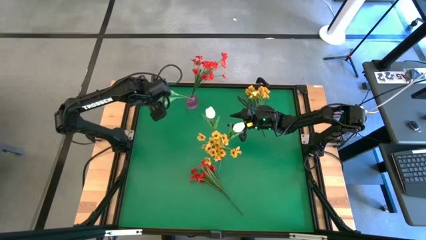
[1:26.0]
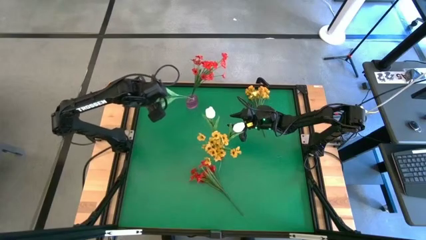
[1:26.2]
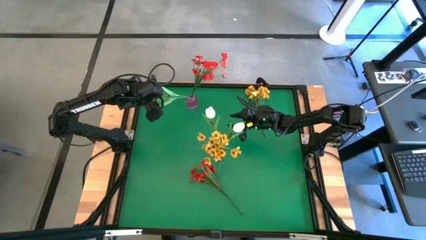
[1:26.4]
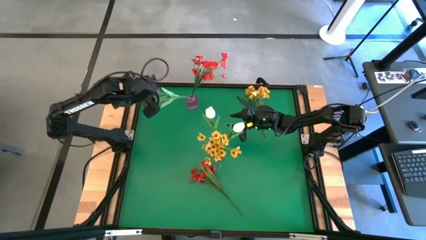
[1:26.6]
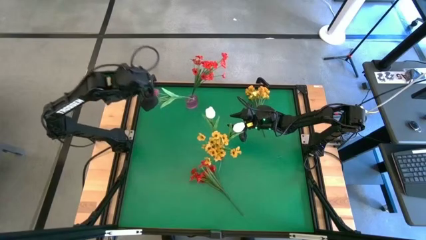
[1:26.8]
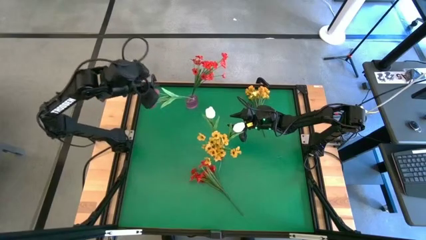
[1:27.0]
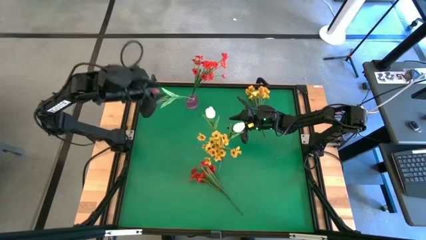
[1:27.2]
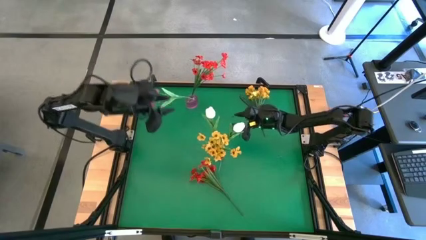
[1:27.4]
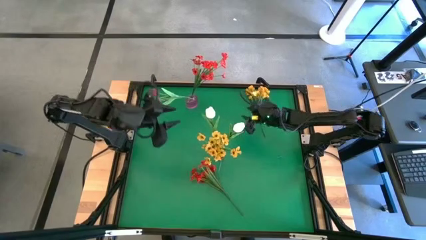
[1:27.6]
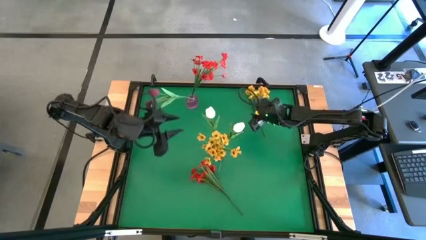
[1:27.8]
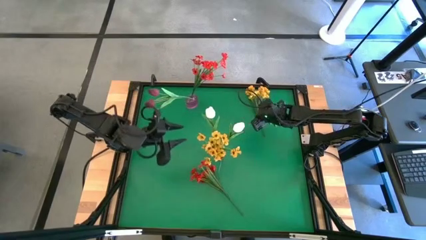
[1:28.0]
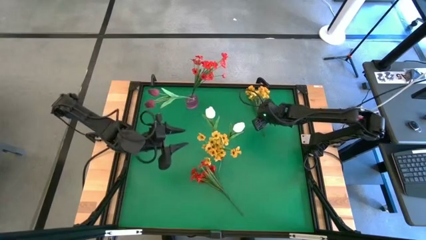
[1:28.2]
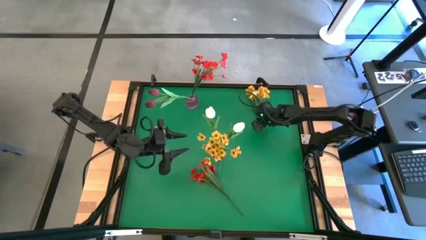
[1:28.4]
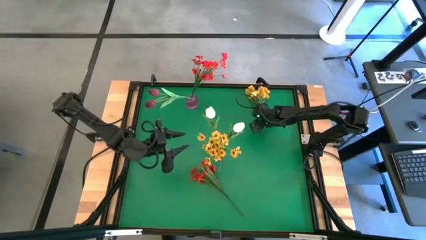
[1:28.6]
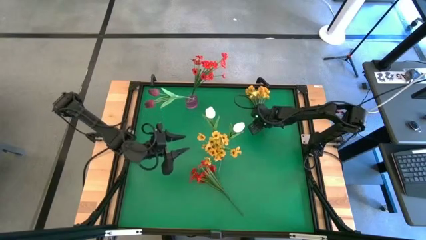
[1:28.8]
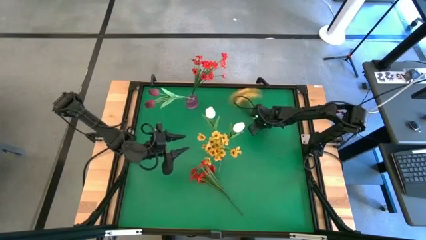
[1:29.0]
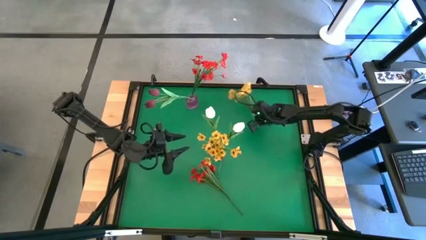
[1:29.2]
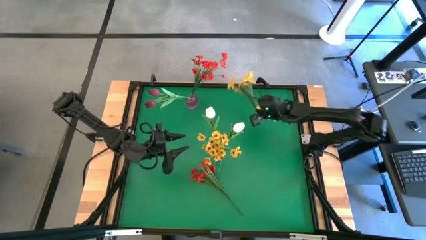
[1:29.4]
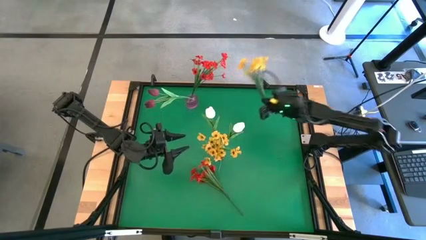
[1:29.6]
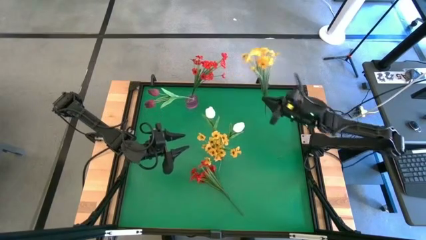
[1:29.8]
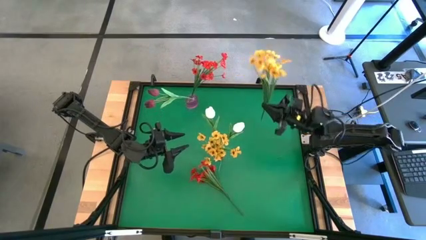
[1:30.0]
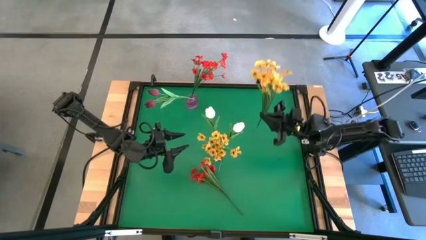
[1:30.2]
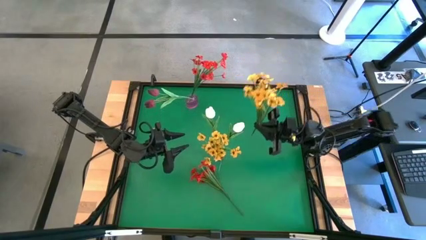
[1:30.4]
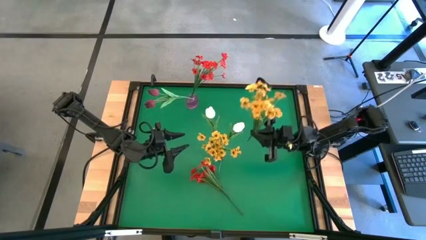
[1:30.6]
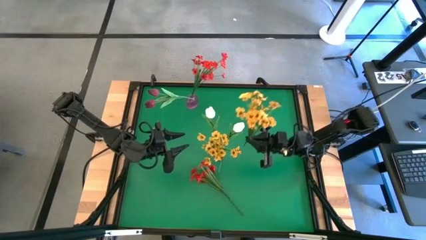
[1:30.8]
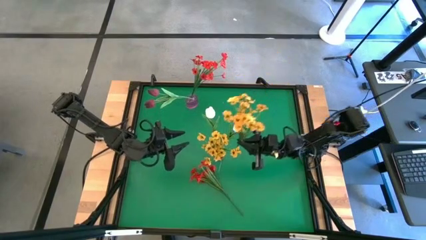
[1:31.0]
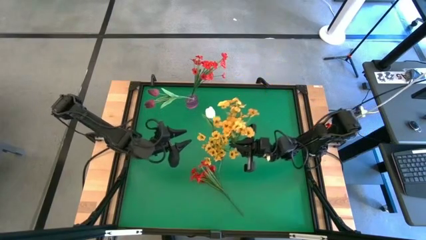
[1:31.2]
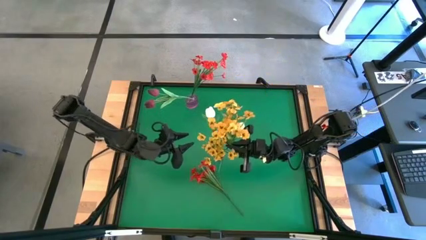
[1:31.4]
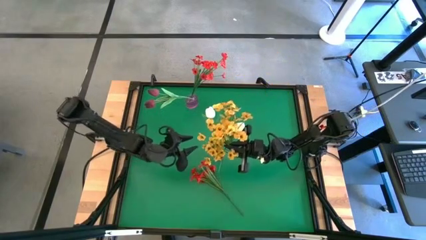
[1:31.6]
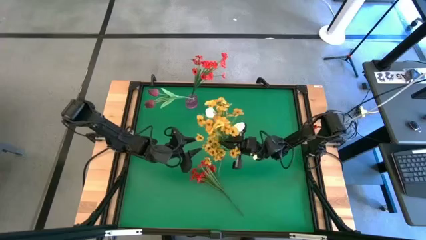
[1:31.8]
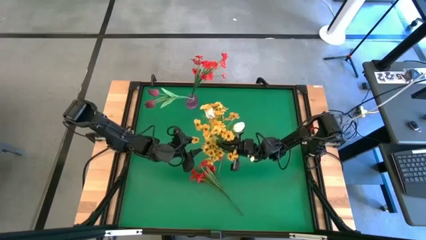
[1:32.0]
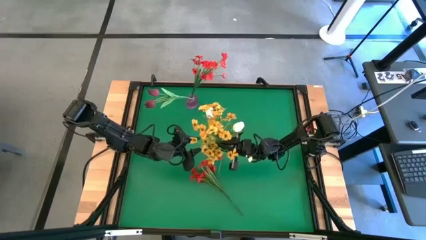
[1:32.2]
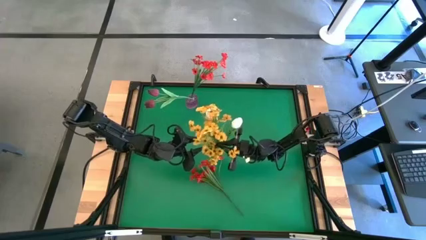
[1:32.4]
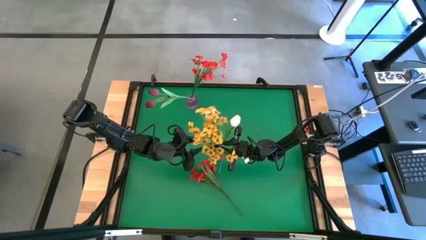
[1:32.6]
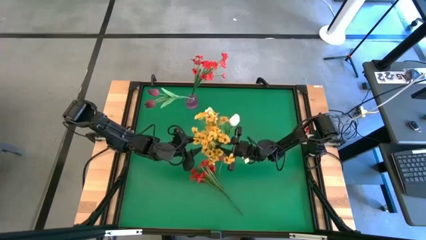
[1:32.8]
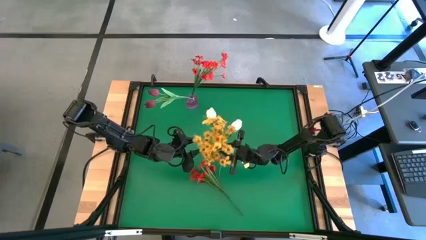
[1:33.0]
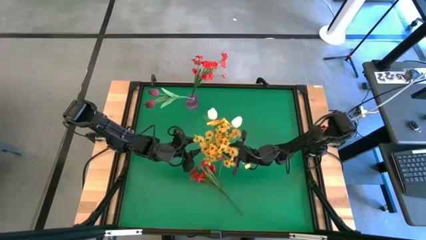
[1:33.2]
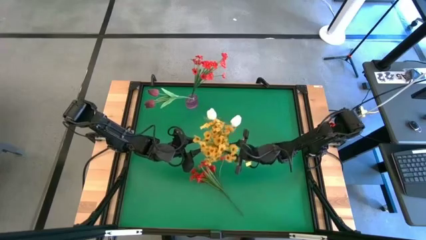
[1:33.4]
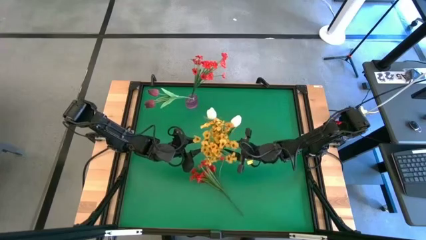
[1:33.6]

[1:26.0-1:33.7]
Task: Sort flowers into vase by color
Put the yellow flowers into the transparent vase

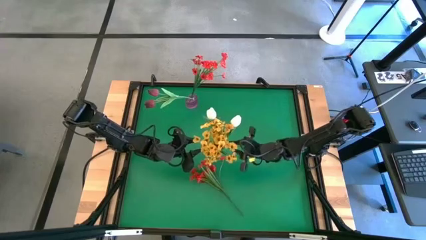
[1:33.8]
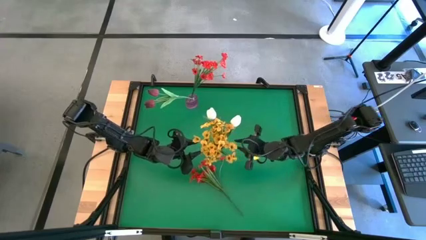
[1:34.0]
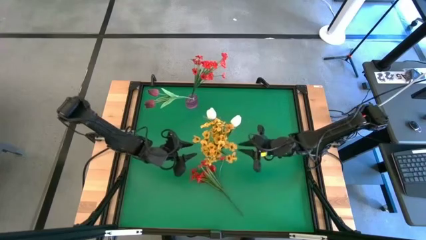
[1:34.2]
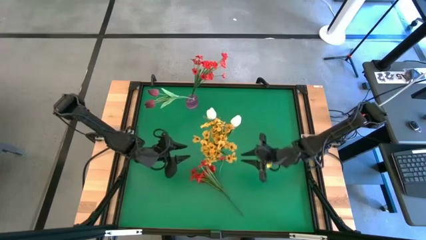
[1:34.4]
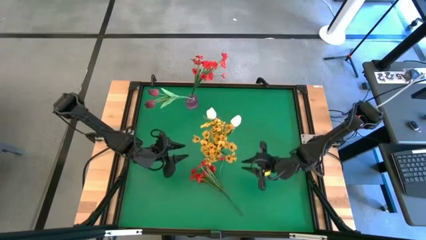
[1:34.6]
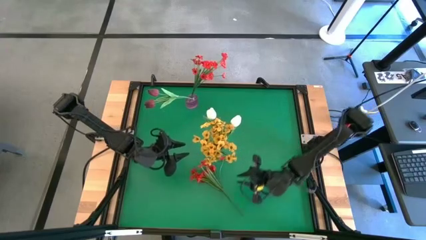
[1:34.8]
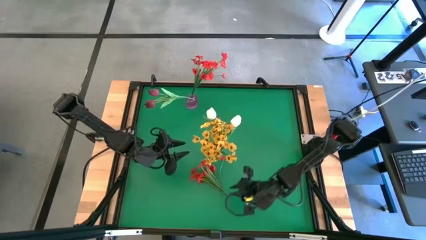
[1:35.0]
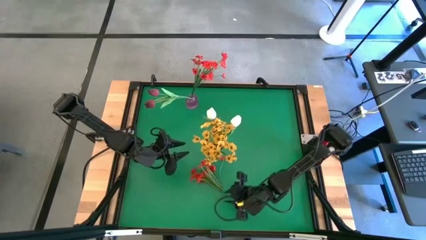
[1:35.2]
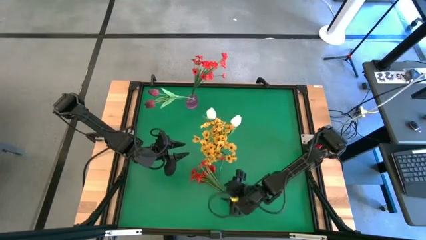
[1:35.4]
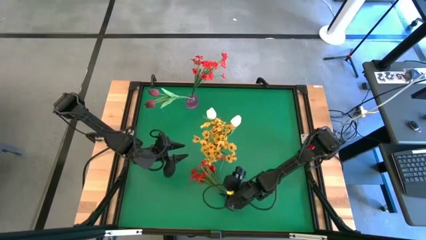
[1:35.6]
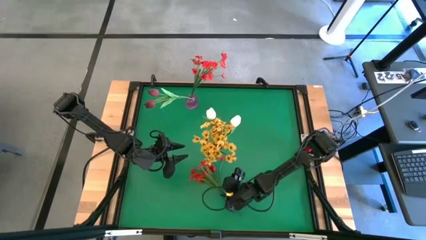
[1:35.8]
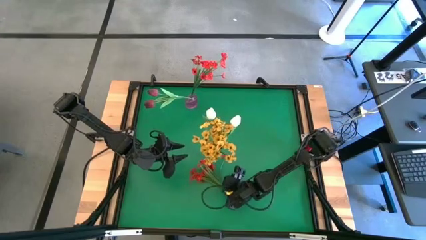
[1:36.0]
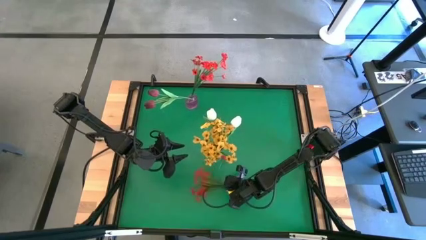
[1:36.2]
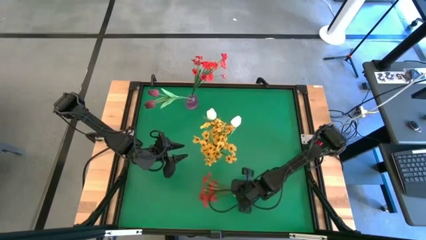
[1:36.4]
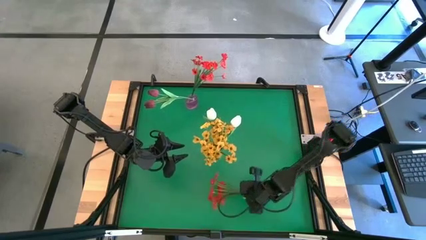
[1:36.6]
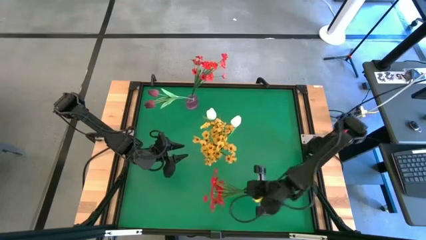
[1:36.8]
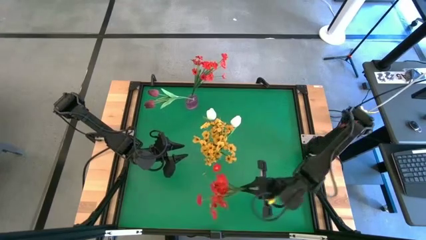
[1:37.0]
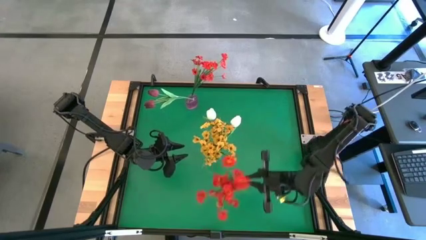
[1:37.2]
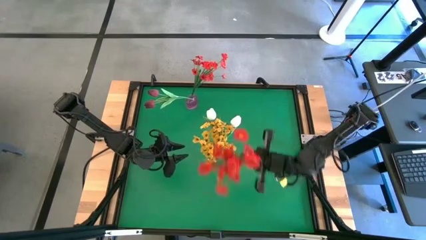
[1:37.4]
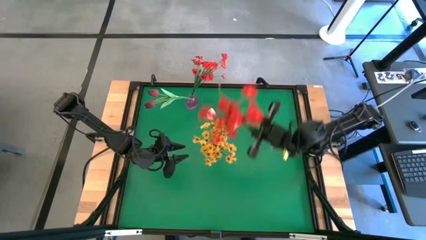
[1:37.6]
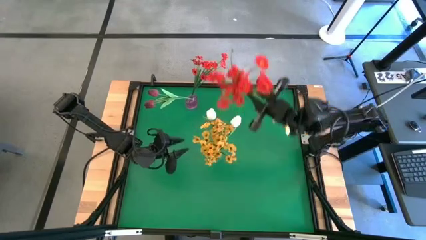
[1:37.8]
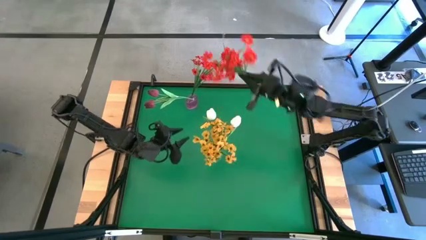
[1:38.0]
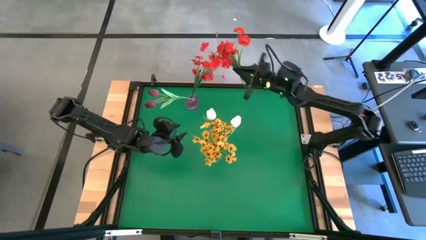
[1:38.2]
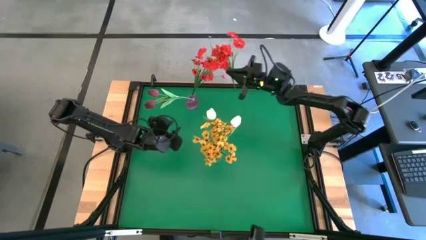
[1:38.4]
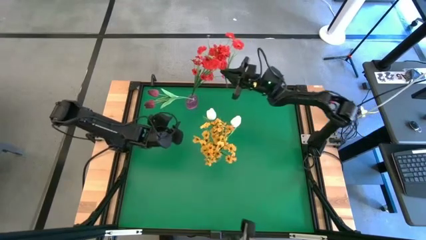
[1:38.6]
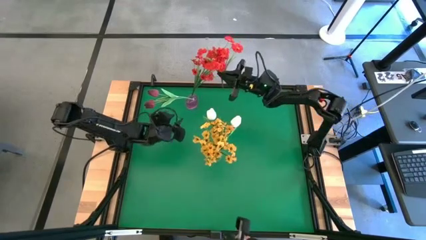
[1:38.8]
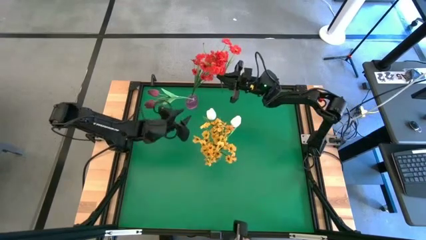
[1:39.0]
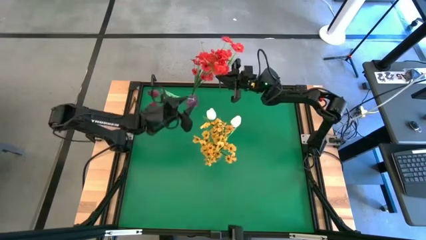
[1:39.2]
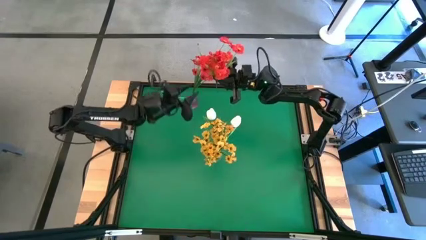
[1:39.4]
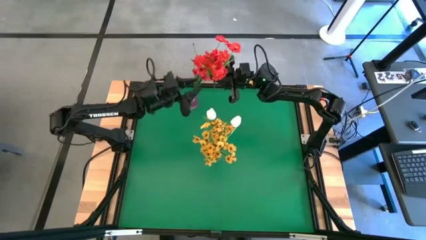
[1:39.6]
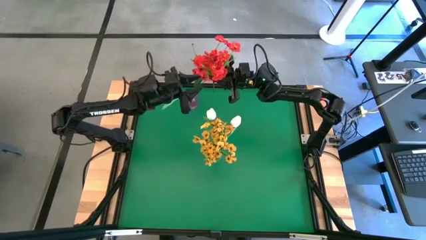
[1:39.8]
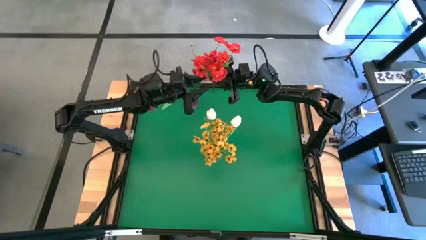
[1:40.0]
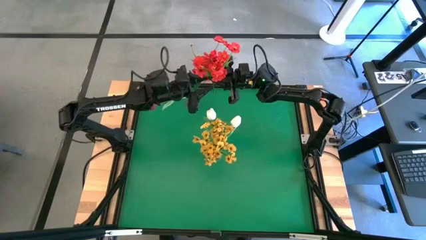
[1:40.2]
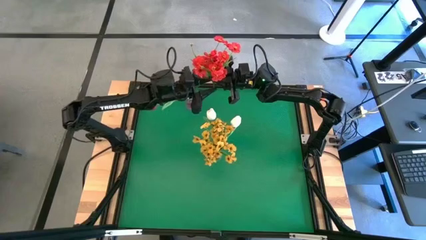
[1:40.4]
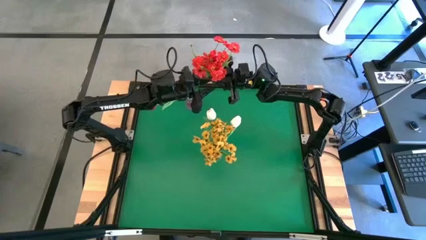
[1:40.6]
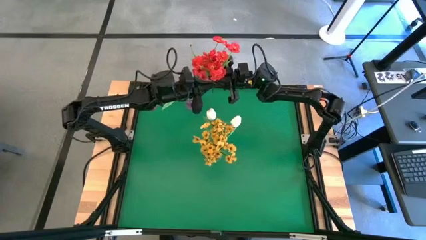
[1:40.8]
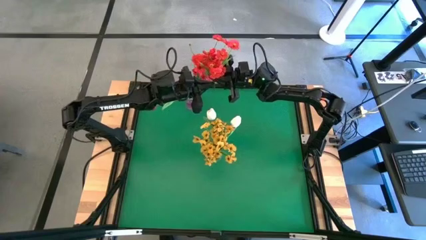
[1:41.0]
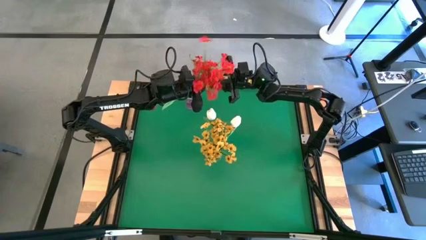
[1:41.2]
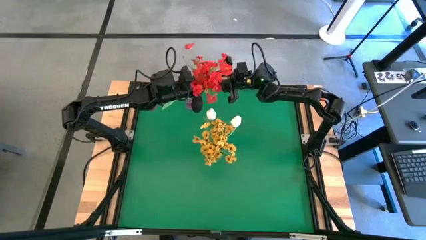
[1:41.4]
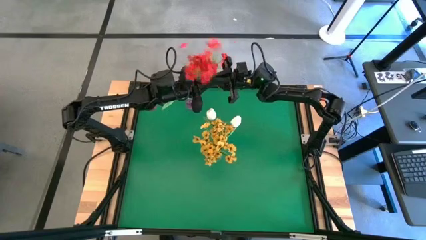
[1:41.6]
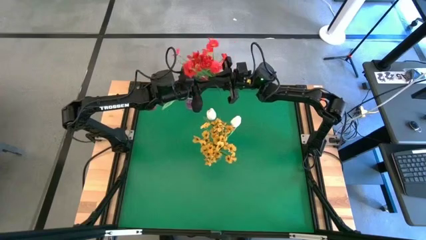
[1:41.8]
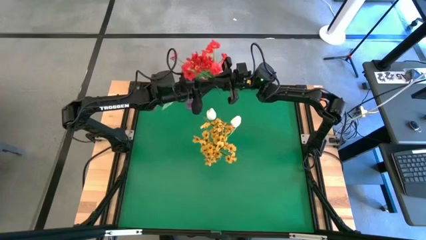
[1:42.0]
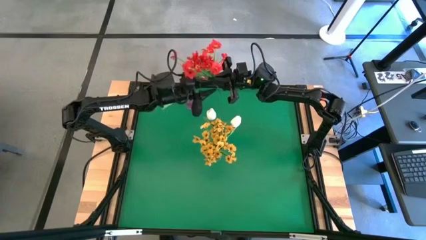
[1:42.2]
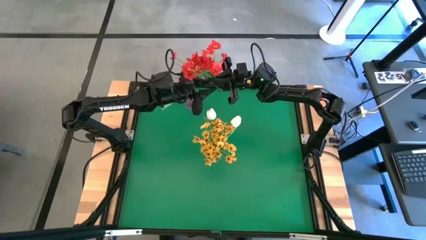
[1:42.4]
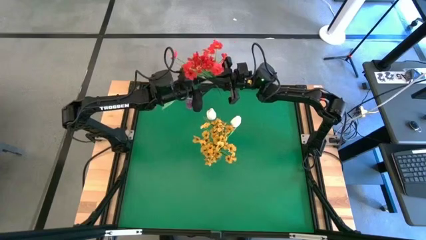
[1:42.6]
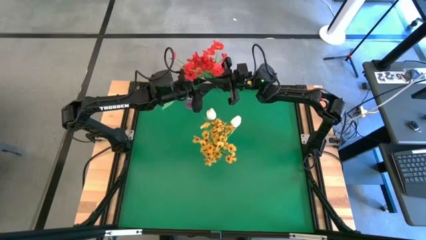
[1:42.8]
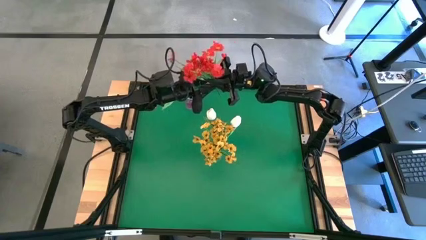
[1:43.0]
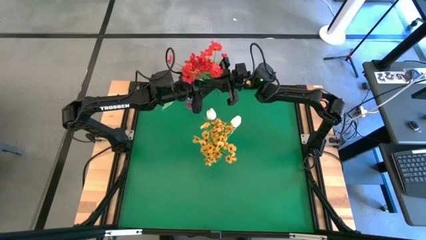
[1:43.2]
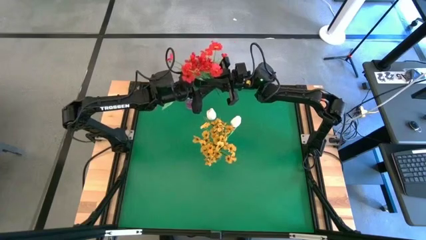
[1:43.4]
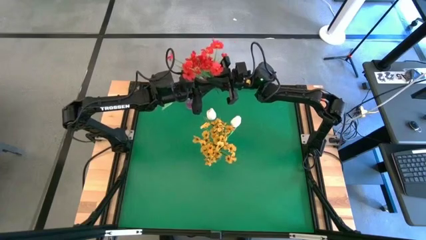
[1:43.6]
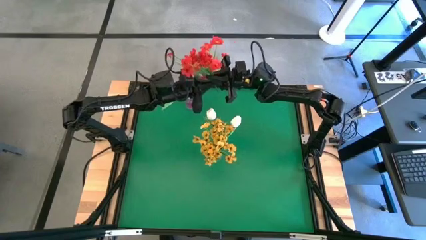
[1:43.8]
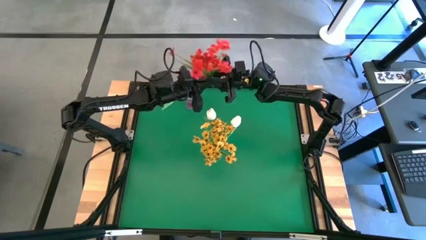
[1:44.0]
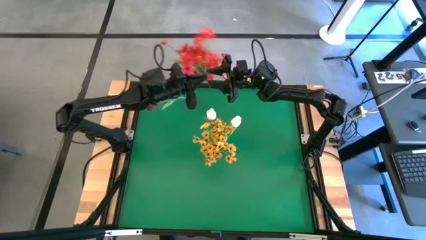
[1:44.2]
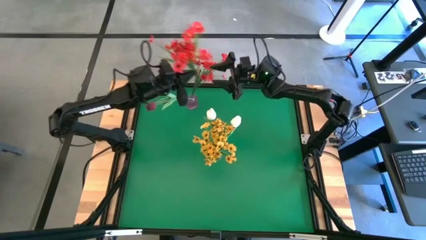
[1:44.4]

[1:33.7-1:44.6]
Put the red flowers into the pink vase
